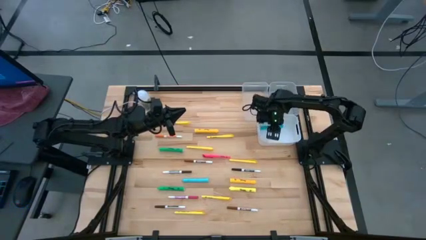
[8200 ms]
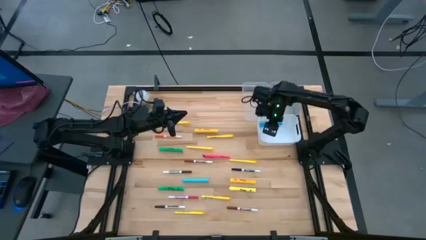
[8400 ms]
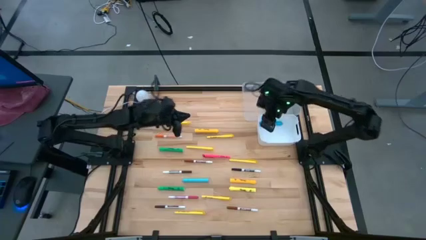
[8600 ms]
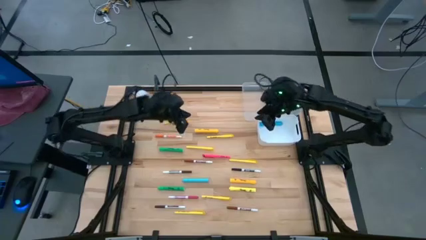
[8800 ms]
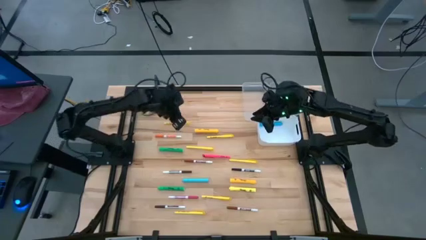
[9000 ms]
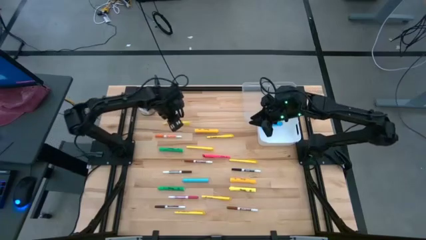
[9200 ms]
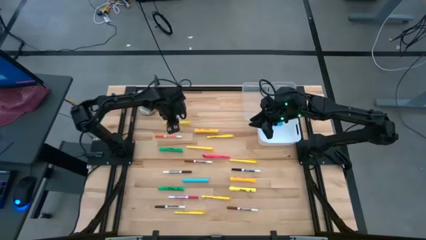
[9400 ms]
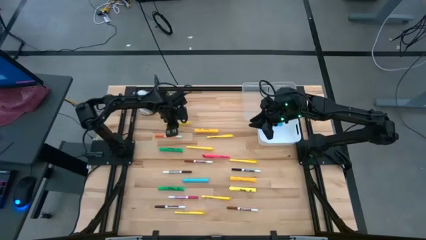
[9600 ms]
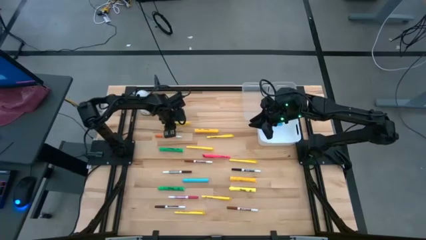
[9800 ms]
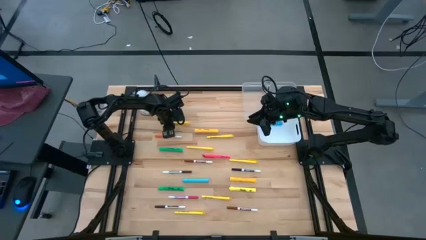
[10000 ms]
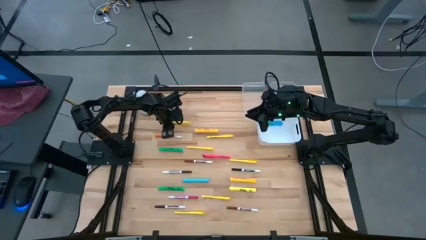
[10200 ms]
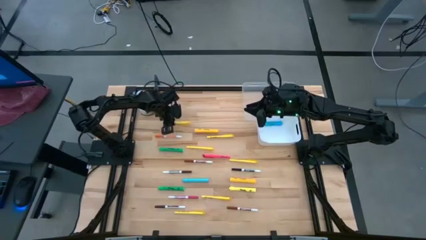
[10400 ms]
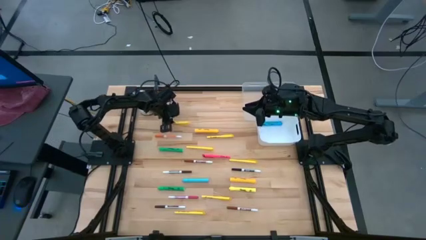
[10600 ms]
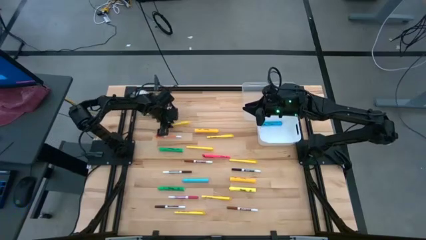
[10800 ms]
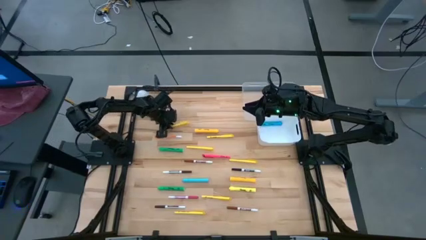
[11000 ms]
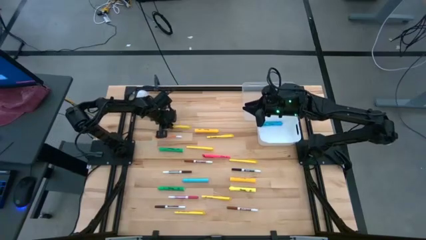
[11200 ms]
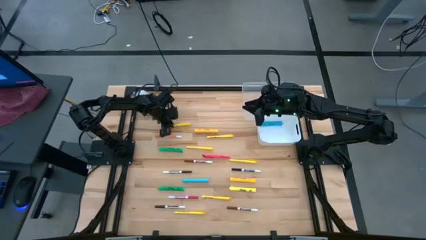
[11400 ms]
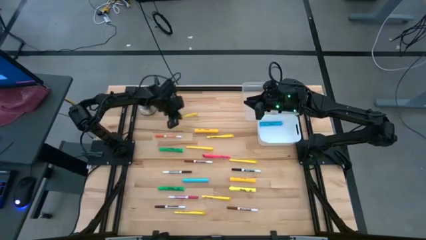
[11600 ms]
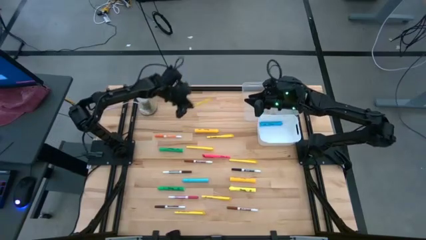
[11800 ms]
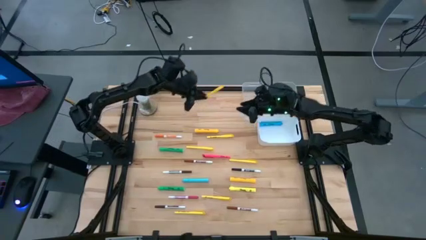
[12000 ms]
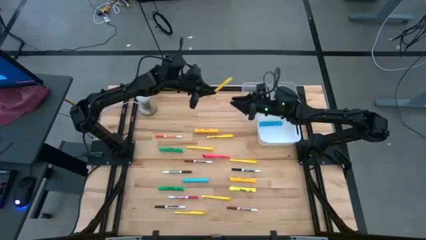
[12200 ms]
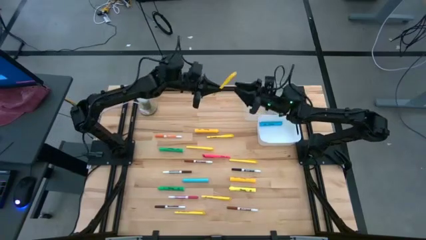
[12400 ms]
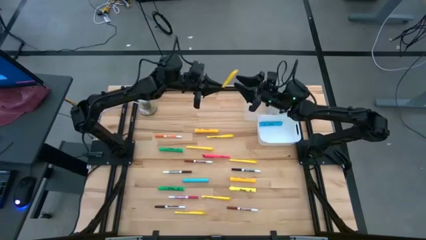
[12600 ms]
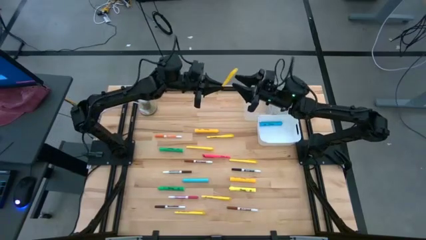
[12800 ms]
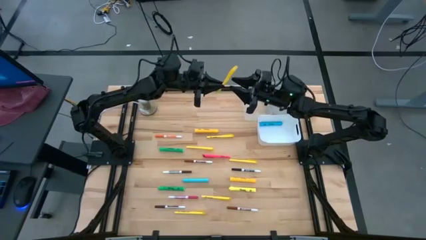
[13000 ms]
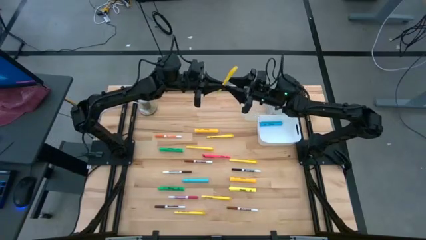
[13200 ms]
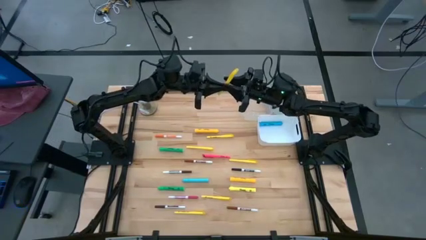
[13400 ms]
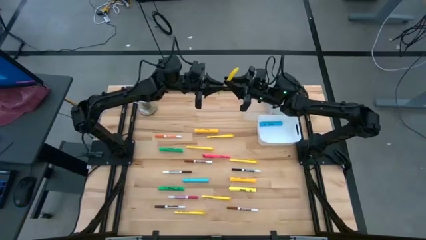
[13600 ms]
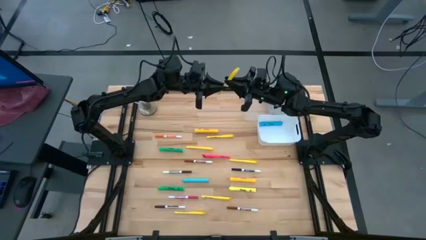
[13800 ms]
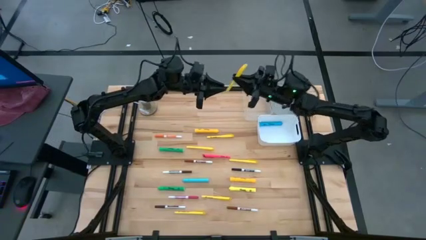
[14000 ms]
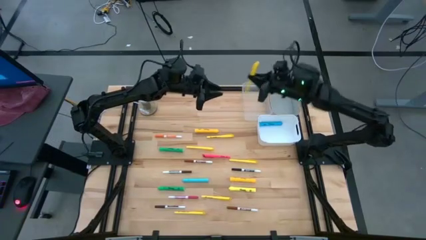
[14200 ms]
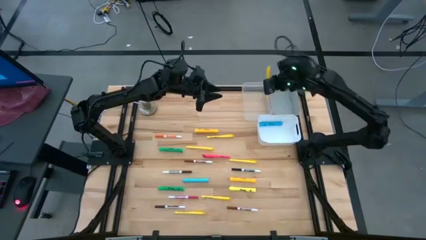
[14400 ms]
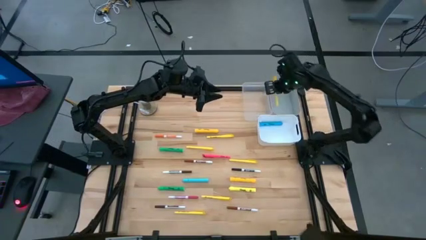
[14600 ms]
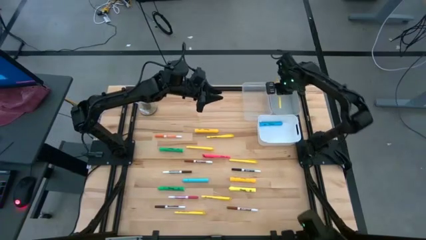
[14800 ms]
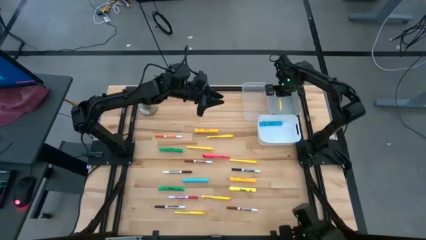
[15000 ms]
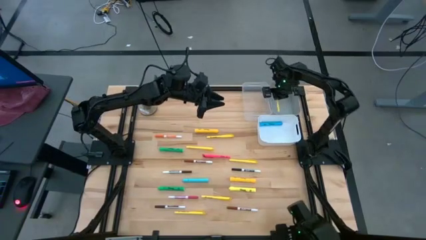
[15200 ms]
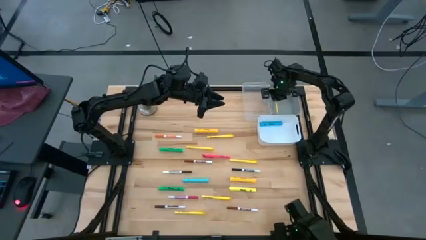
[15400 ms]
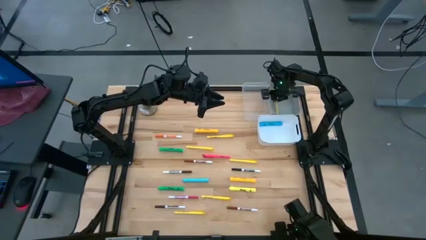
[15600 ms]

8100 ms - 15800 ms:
Task: Pick & Place Markers
Put the yellow pen into the gray bin

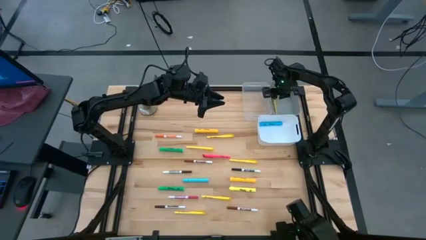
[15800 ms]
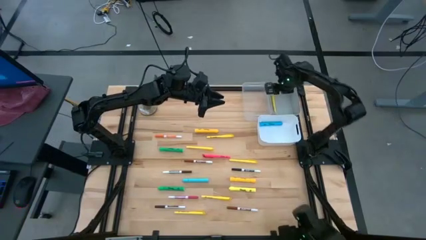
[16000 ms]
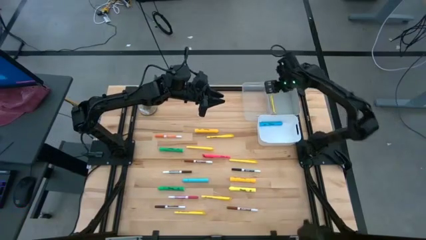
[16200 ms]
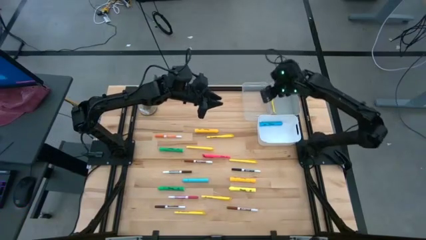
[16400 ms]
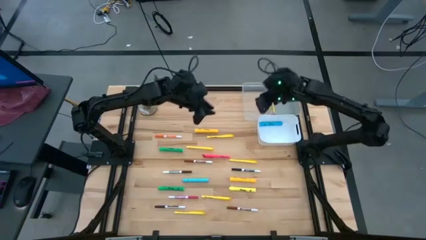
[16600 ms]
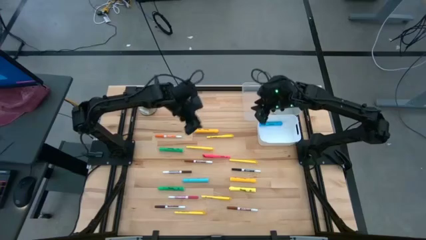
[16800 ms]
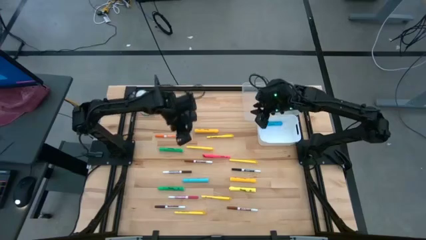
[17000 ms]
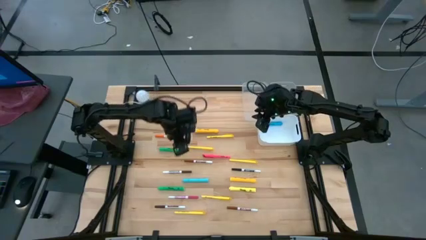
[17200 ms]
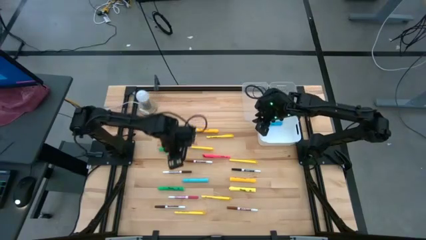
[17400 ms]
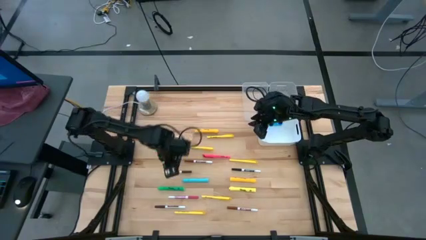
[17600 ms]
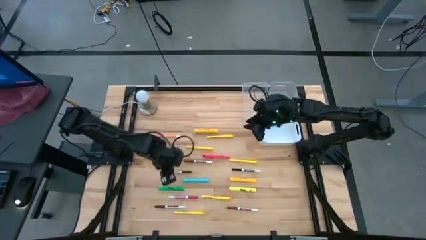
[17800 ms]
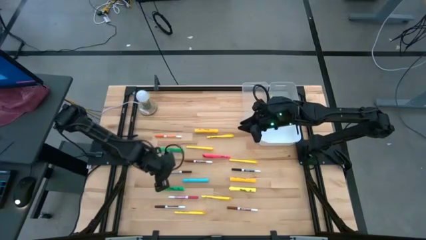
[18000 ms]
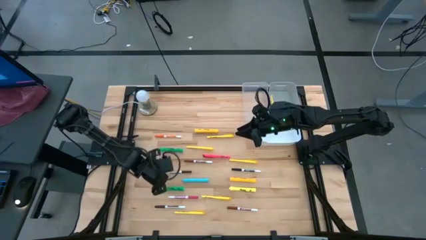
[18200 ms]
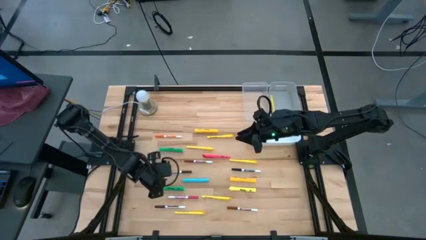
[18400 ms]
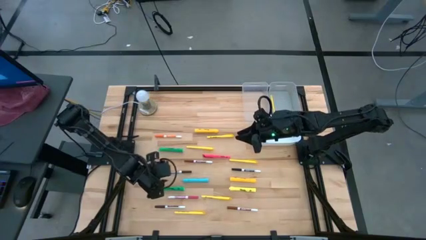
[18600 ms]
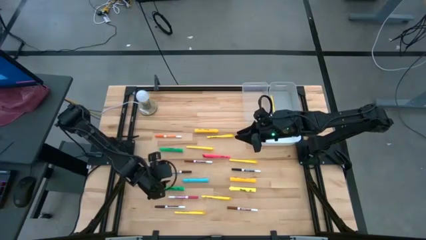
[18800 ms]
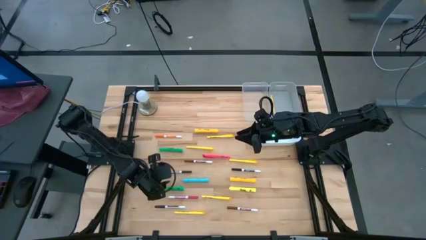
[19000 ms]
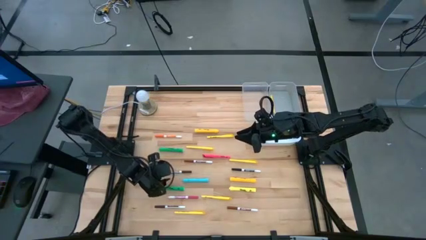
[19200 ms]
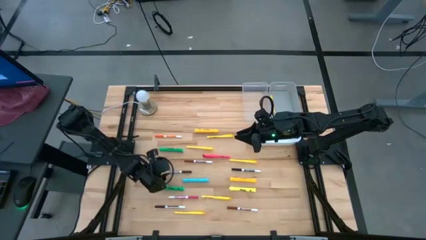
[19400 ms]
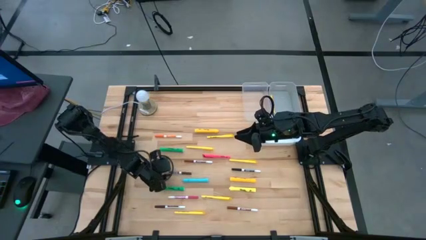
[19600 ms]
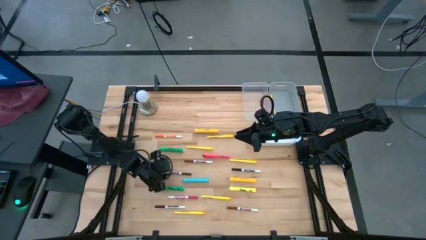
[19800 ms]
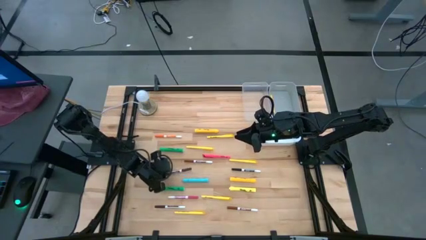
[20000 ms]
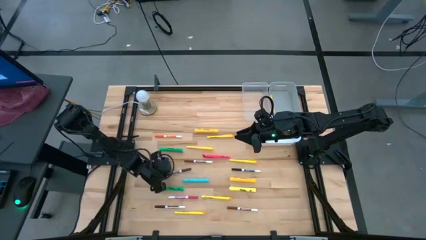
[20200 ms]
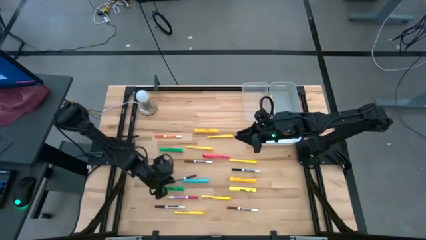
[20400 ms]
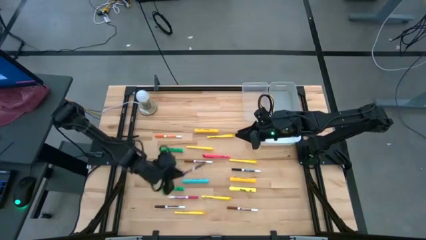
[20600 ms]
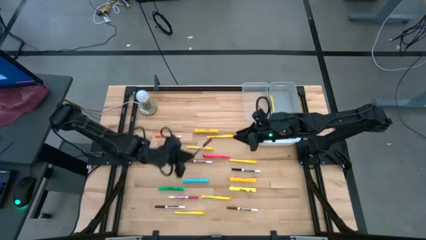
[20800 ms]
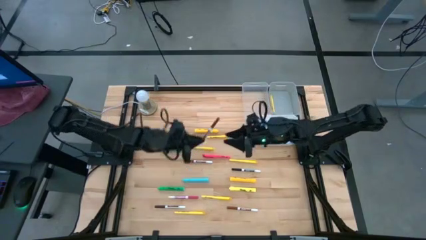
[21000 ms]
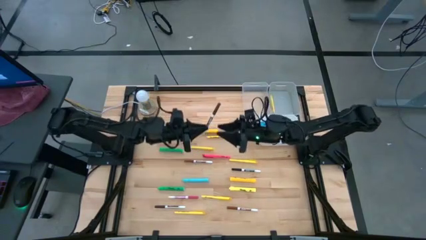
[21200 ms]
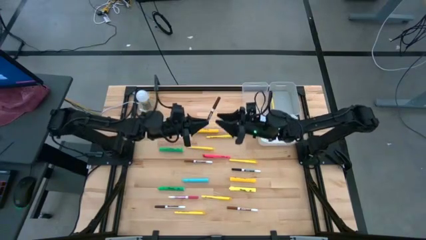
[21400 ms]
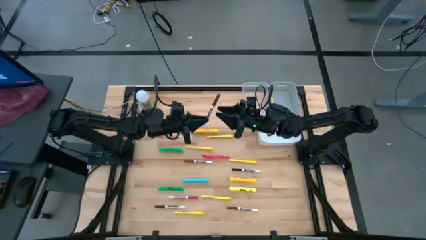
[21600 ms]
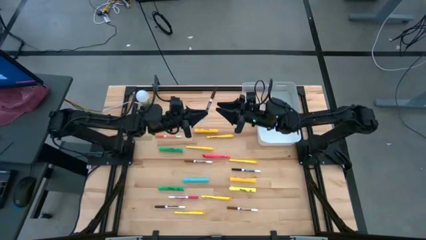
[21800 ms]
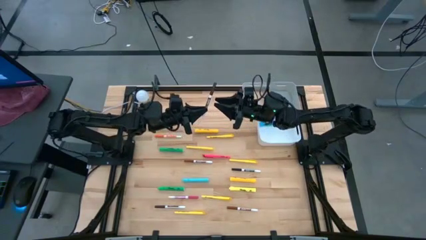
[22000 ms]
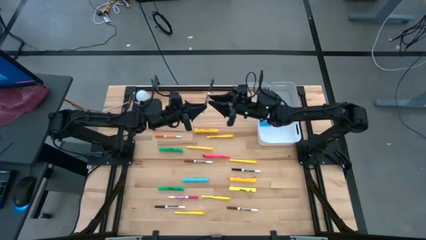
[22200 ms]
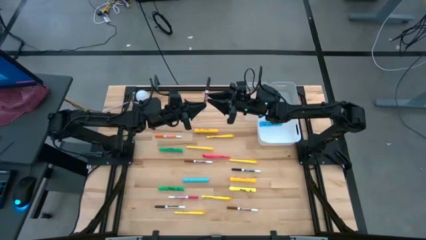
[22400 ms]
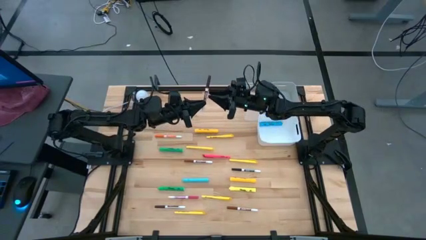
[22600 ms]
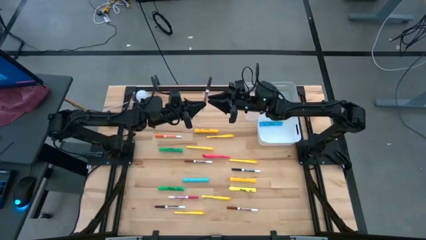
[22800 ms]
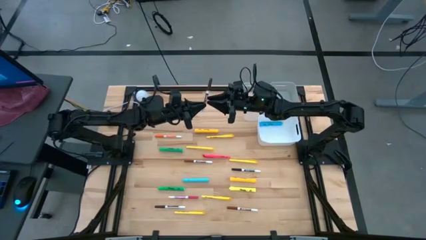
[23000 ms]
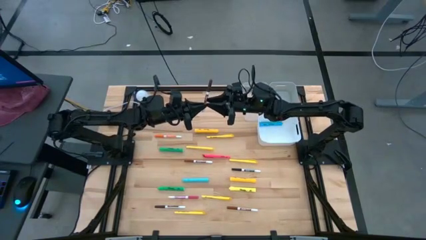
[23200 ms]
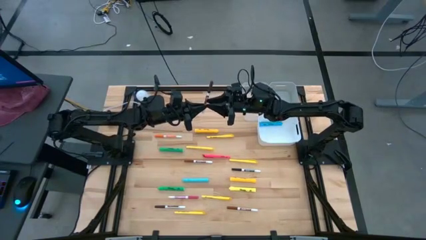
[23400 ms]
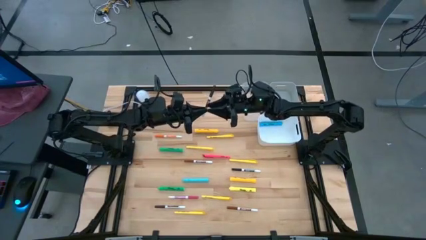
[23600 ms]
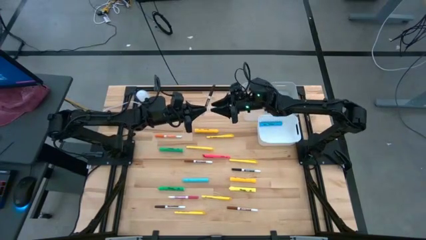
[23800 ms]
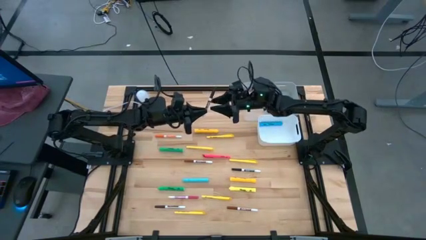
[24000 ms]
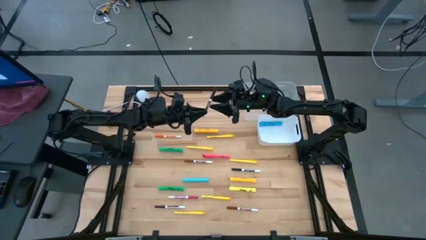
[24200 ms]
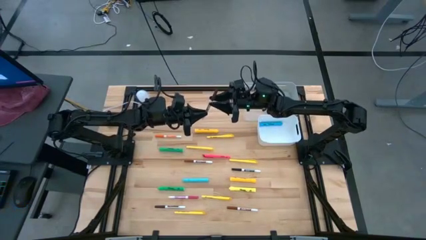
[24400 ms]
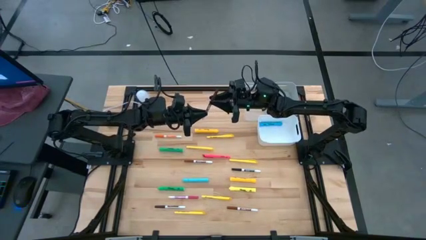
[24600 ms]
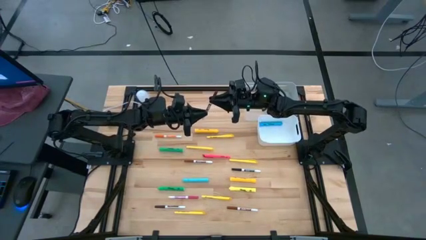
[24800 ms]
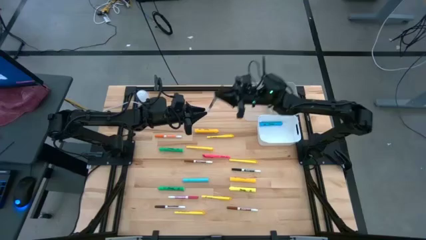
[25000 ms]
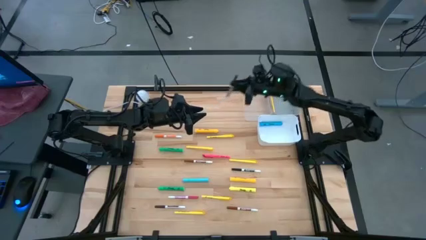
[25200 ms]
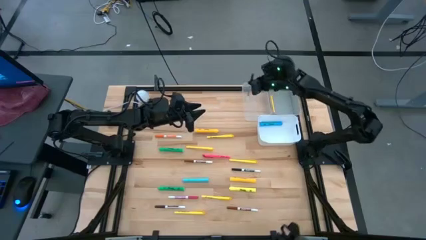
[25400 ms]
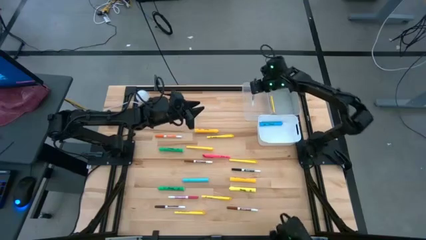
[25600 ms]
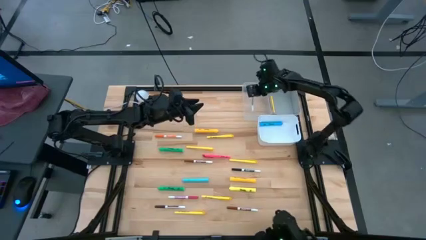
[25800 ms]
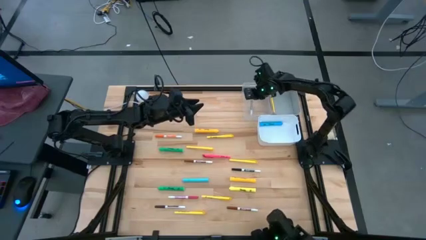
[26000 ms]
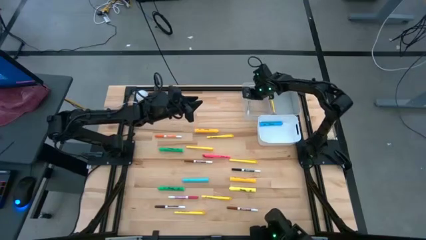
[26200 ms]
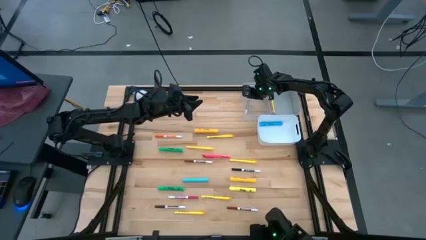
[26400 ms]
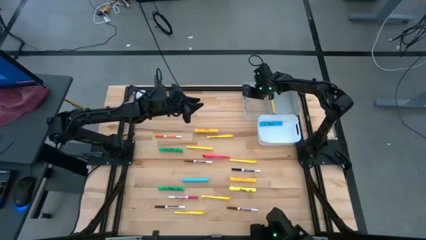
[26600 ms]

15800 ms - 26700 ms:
Put the dark brown marker pen into the transparent bin
